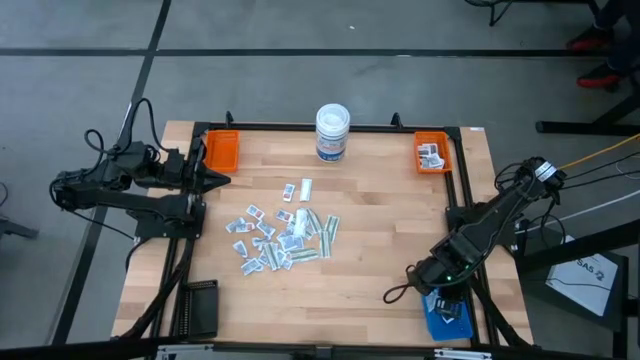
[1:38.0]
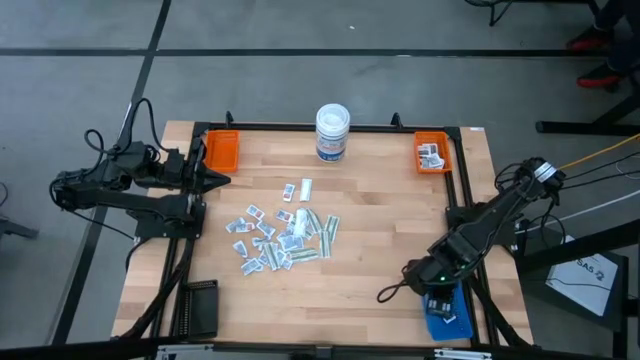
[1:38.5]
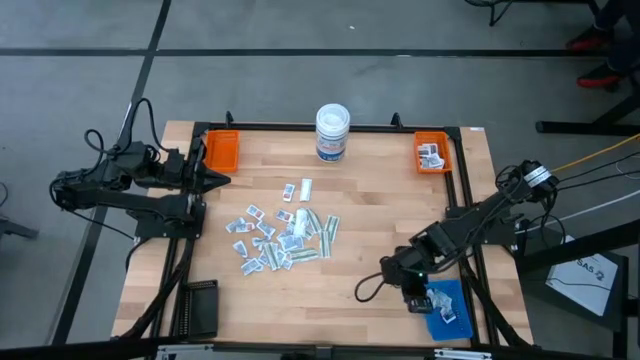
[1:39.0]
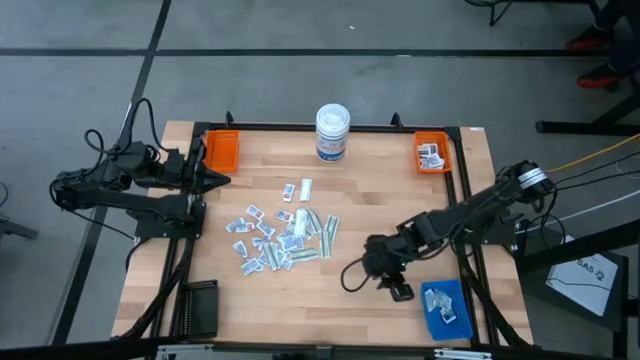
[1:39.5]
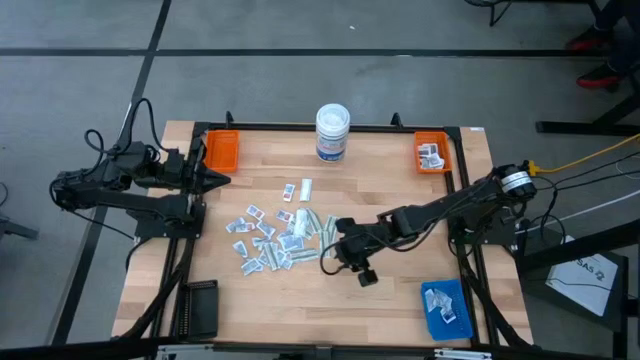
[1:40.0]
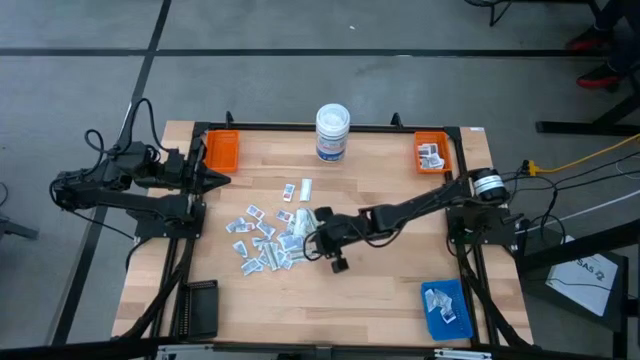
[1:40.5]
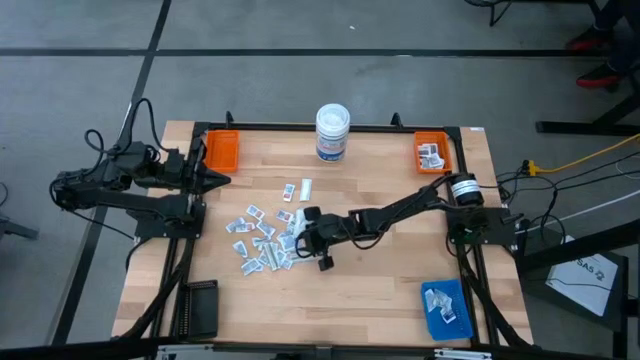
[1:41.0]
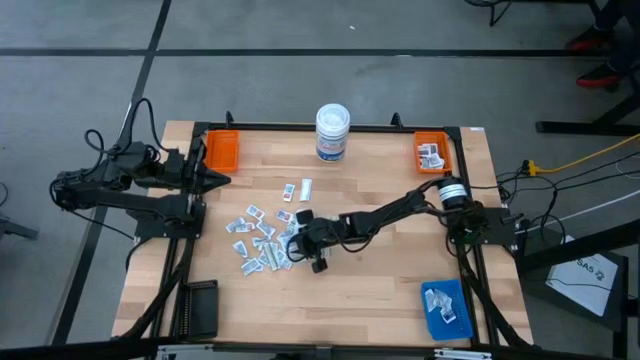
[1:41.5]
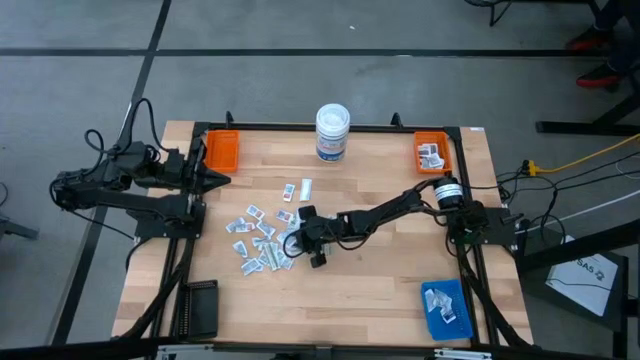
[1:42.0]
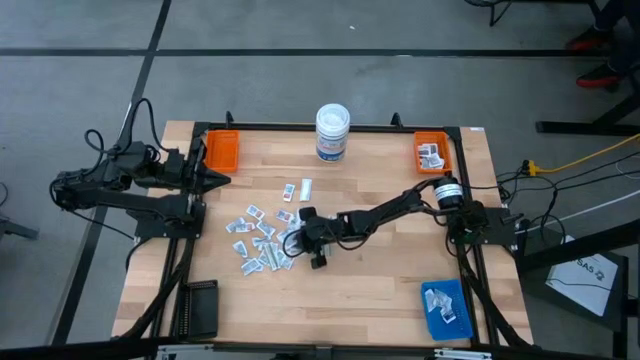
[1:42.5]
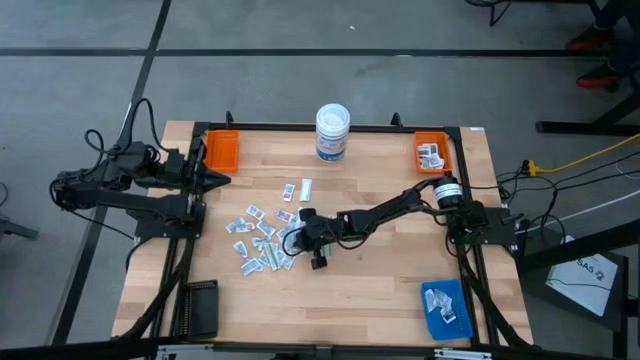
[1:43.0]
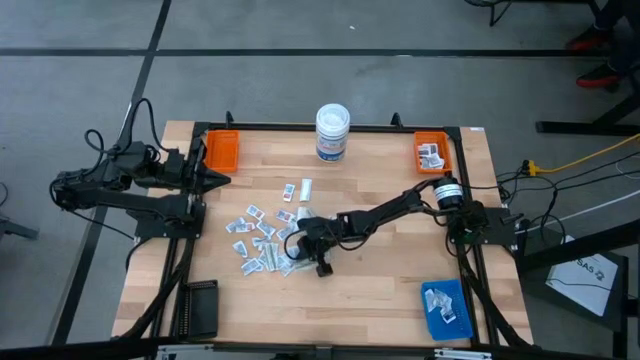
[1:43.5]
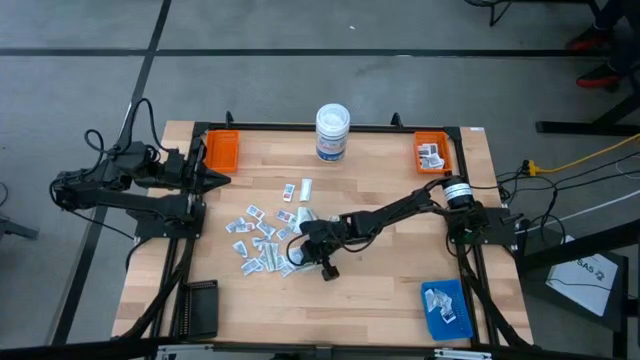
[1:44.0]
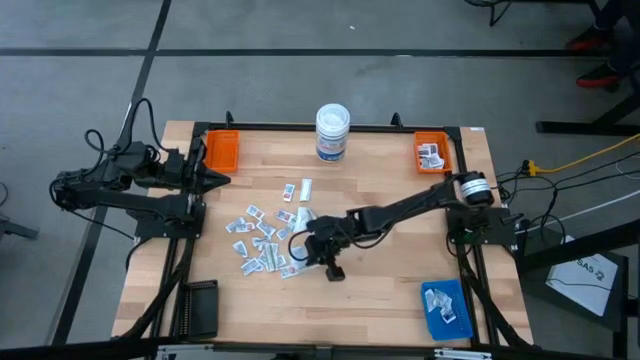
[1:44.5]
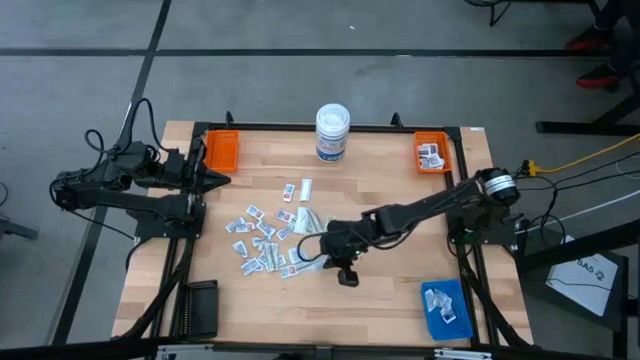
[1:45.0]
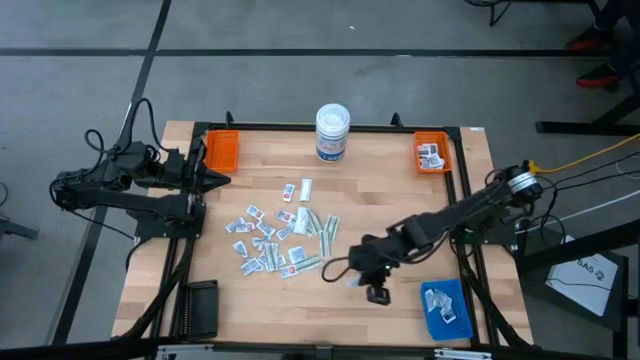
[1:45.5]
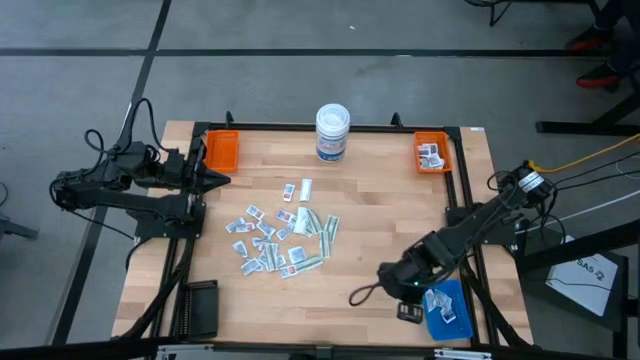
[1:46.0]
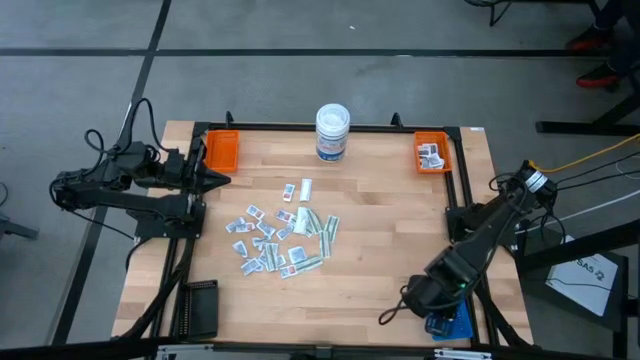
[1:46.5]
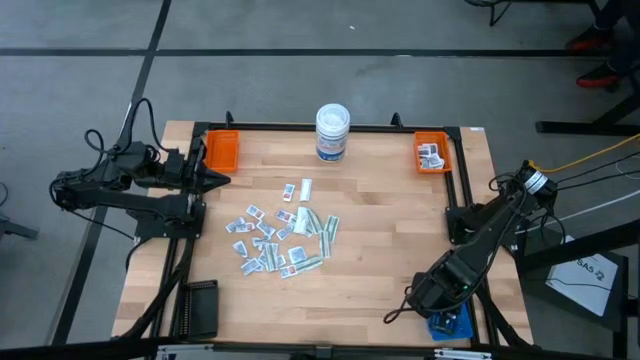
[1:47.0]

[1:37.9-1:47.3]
Task: Pick & Place First Aid Supplies
Put the blue alcohol pad into the blue bin

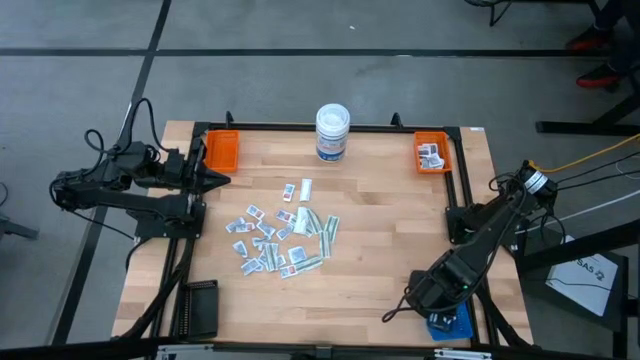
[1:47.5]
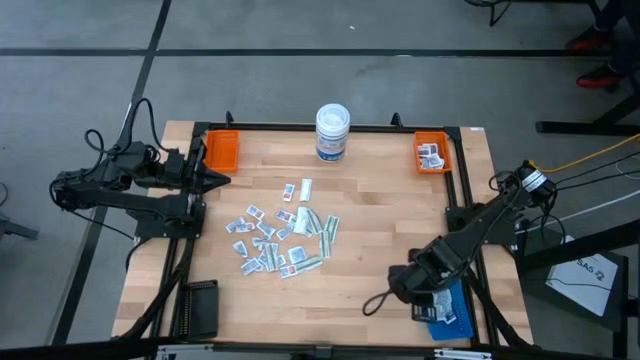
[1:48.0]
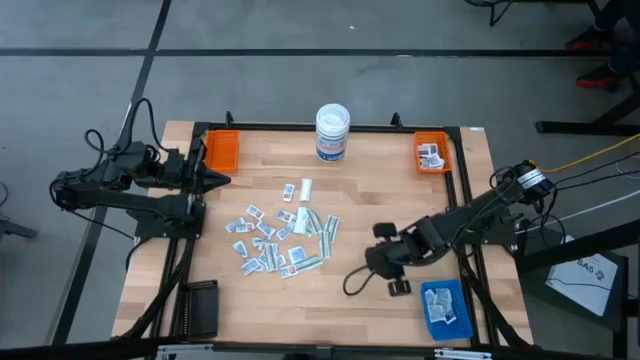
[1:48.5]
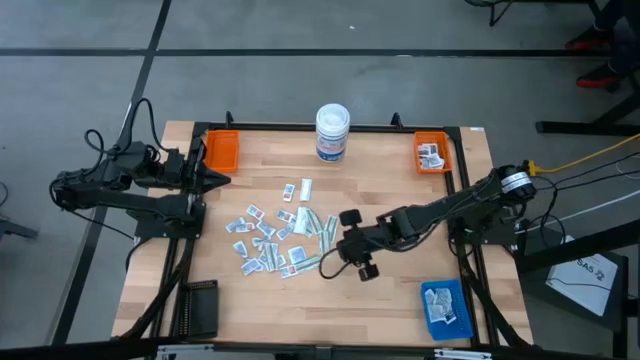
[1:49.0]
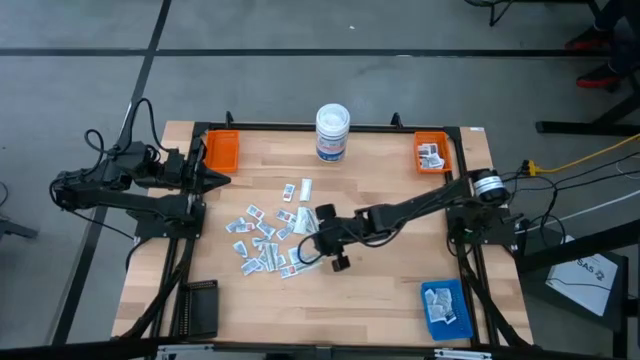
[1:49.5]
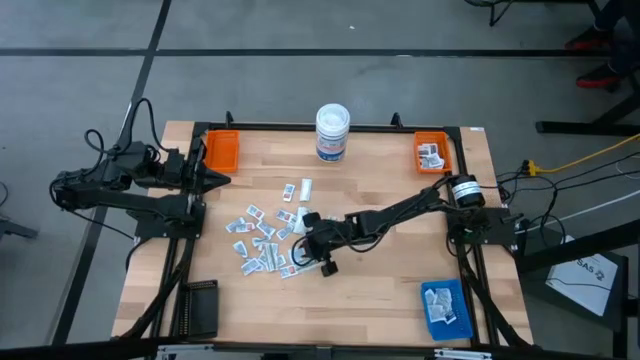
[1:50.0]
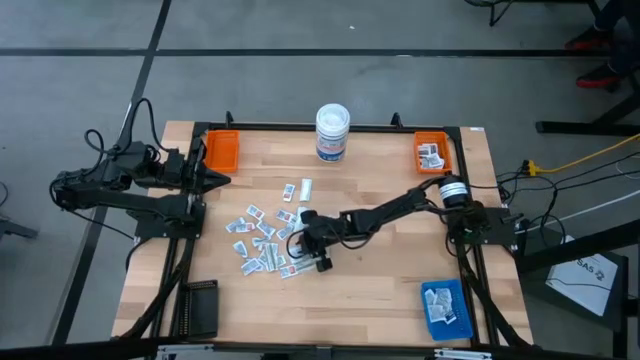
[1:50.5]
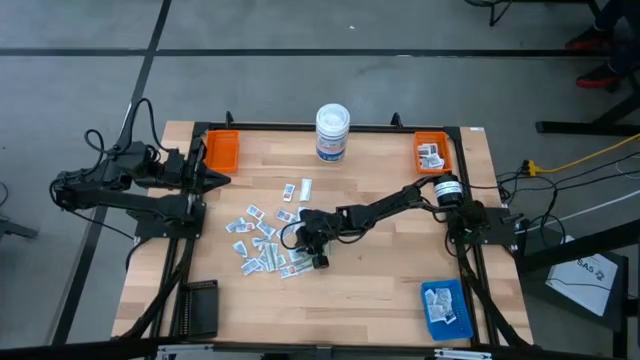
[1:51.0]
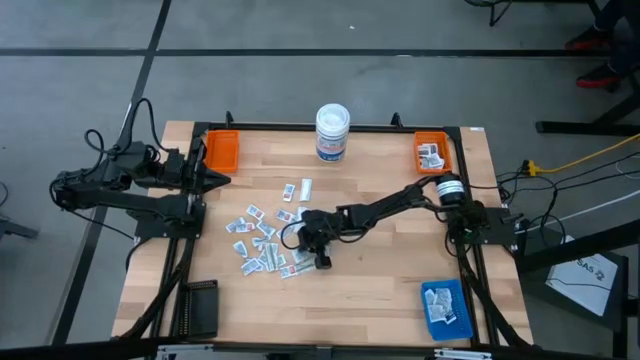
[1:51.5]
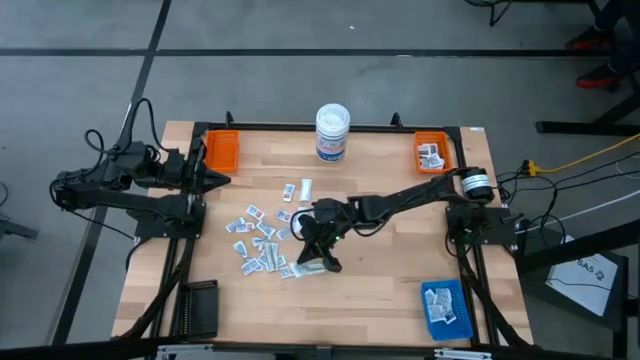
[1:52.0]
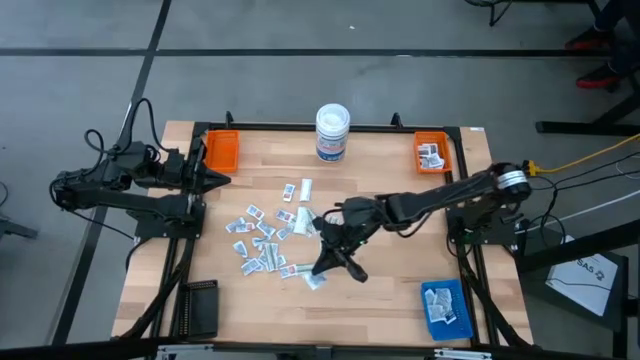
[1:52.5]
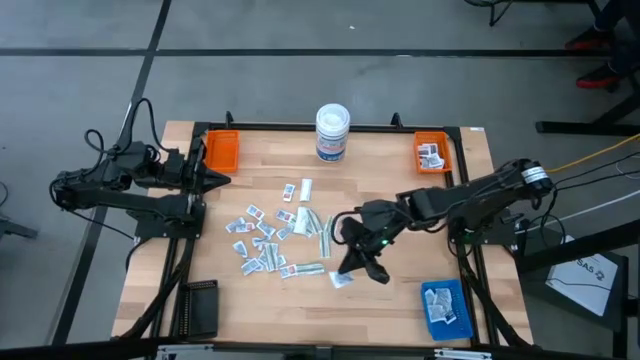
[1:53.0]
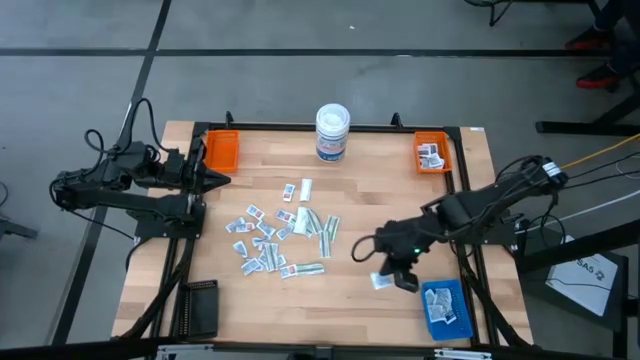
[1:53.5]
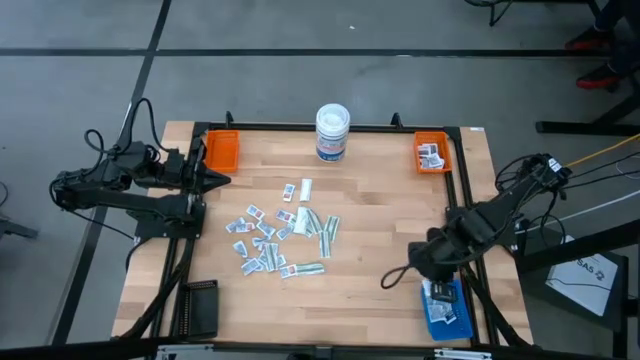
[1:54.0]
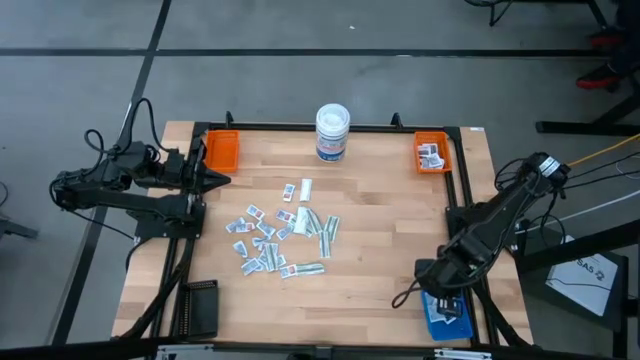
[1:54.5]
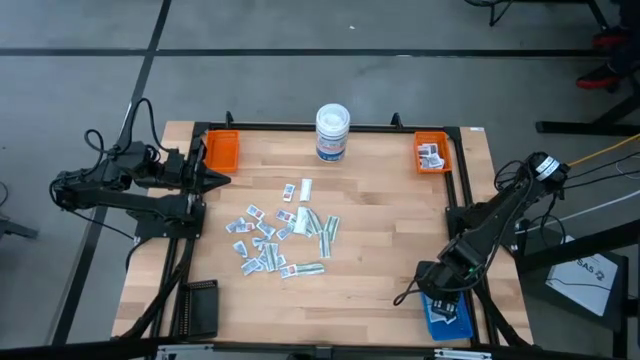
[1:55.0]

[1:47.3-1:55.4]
Put the blue alcohol pad into the blue bin

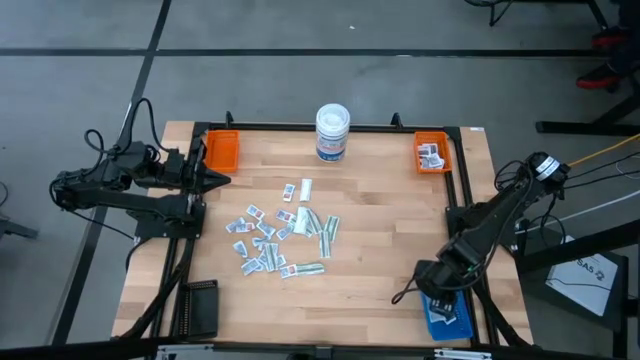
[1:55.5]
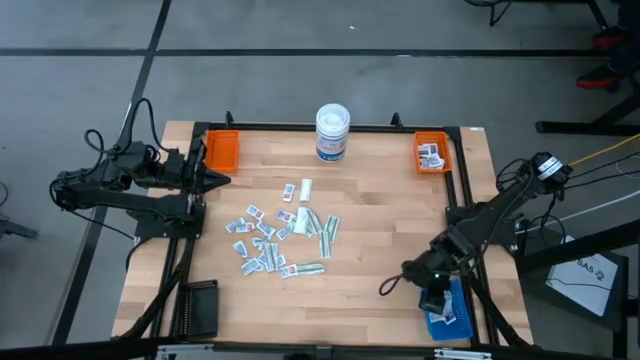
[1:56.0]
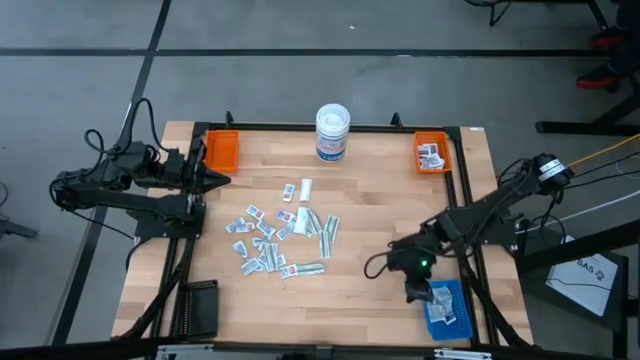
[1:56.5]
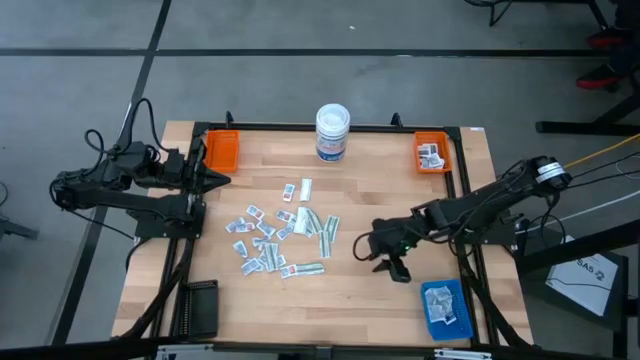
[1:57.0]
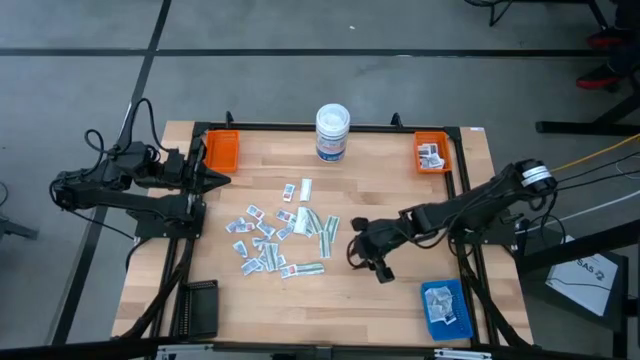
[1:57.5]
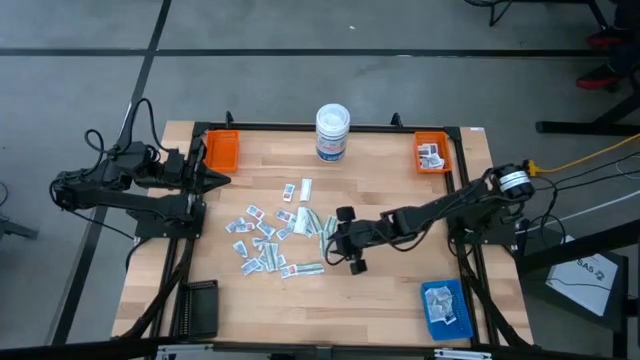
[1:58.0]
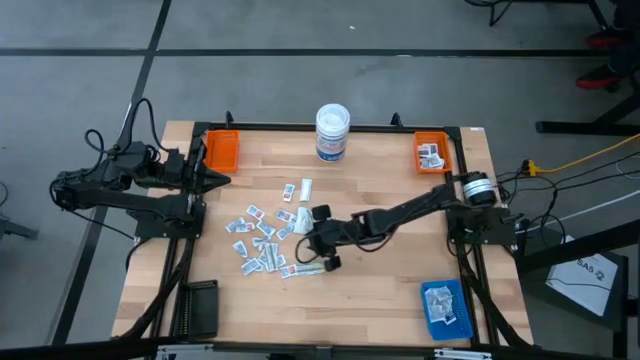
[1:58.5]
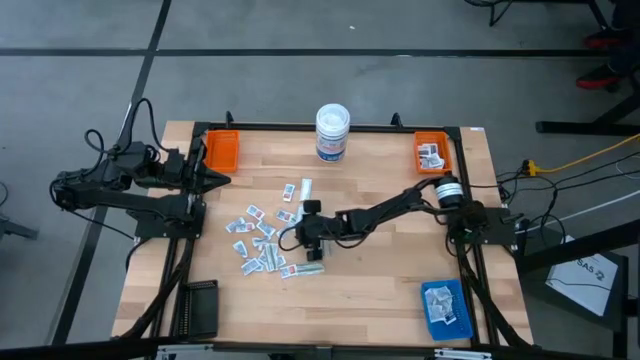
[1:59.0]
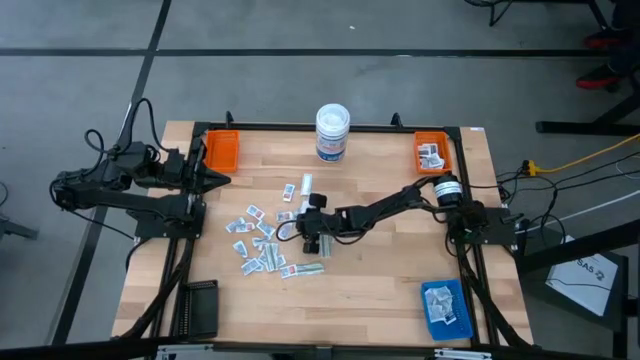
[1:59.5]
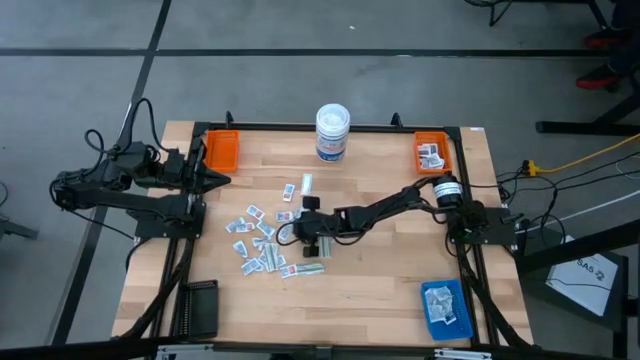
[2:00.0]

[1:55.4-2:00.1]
Put the green bandage pack into the black bin
